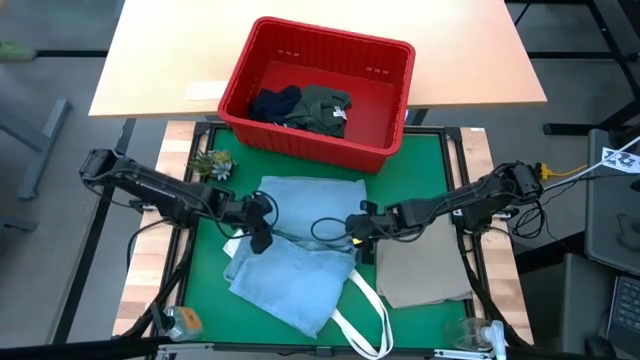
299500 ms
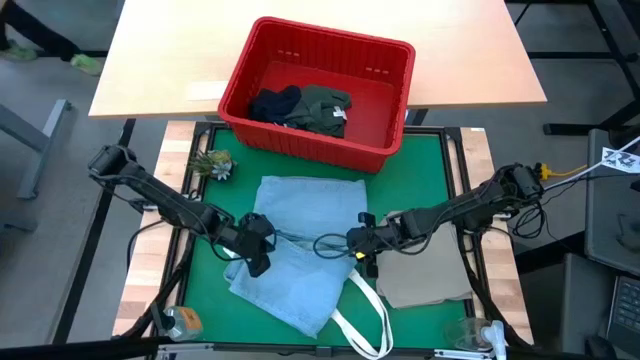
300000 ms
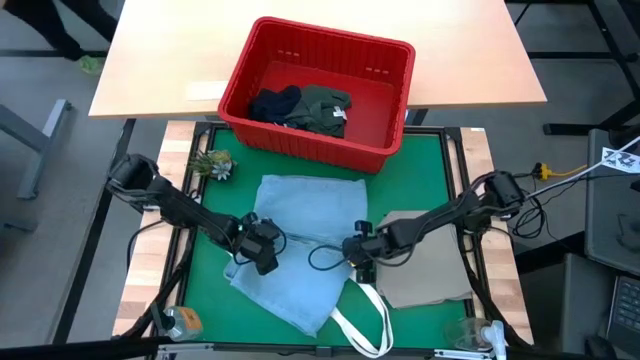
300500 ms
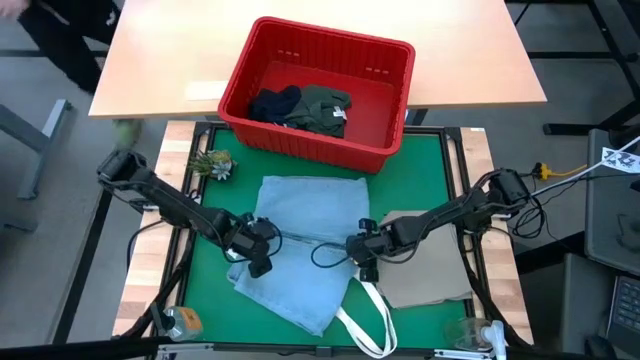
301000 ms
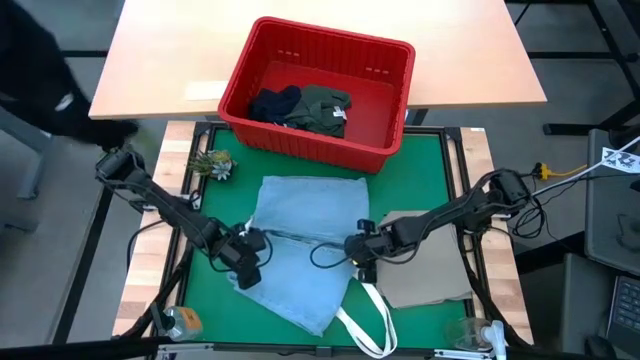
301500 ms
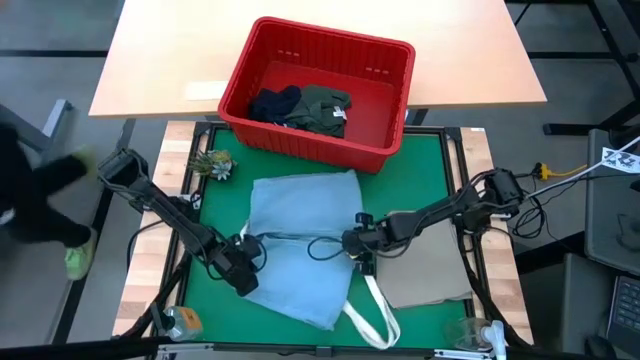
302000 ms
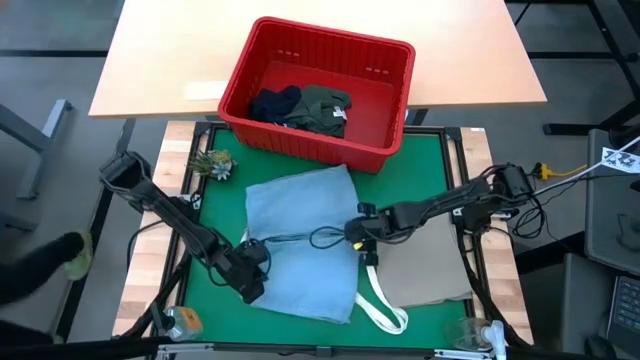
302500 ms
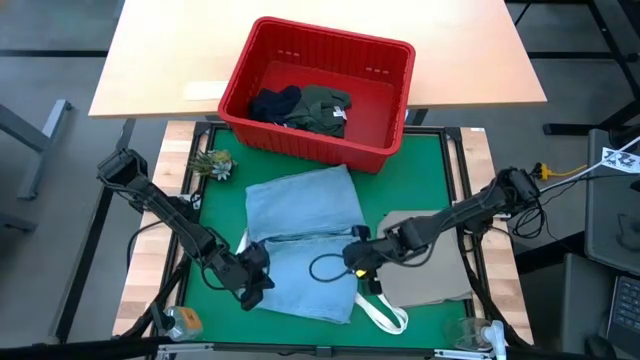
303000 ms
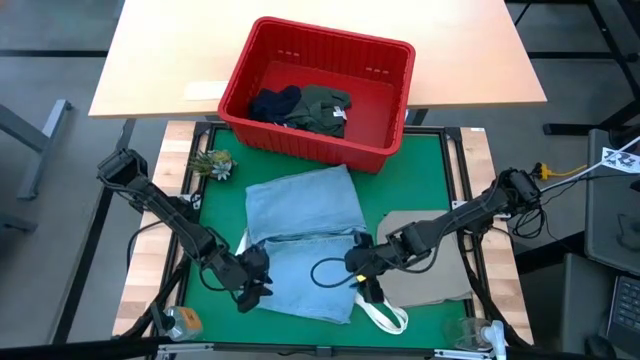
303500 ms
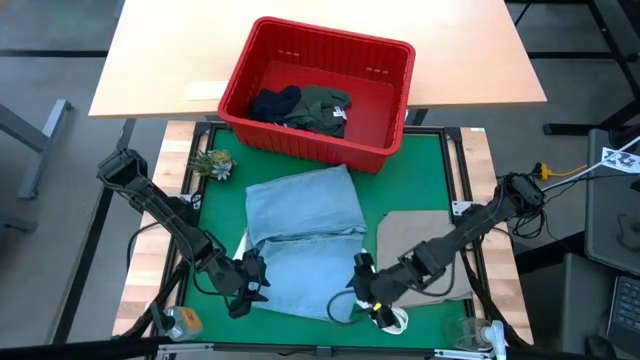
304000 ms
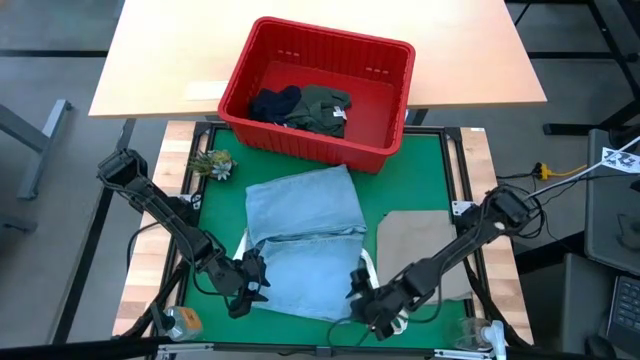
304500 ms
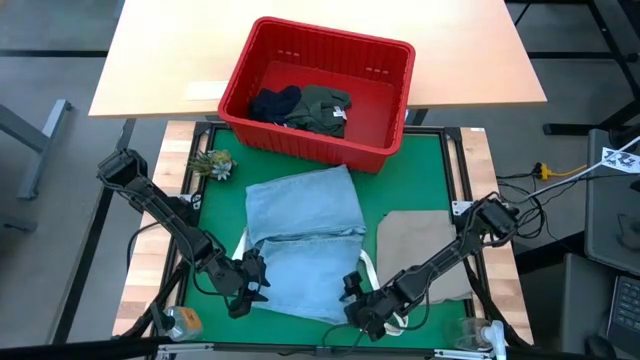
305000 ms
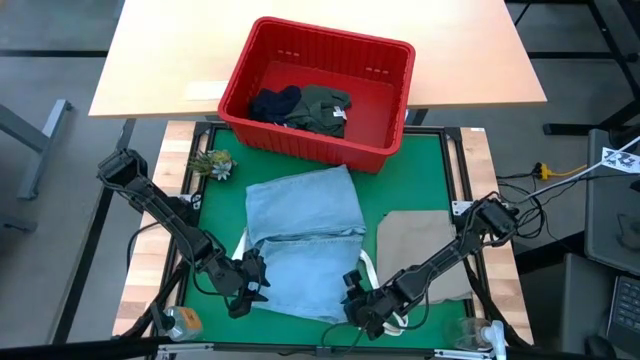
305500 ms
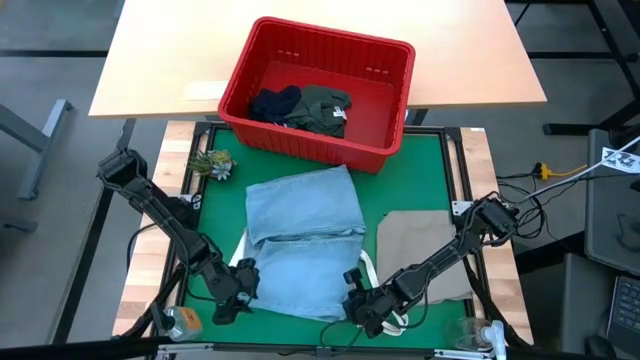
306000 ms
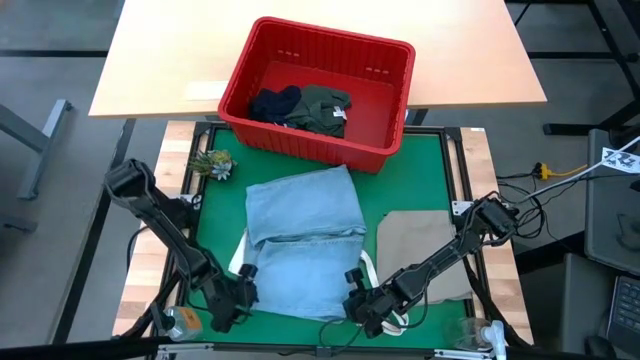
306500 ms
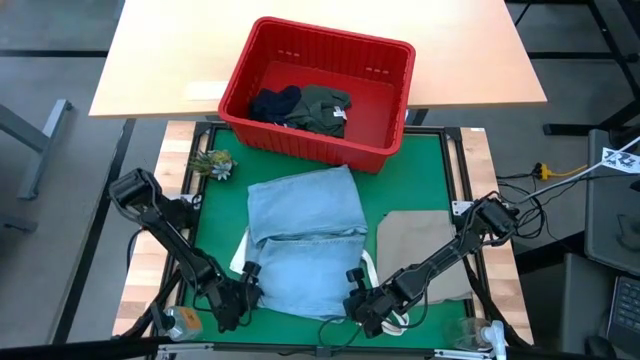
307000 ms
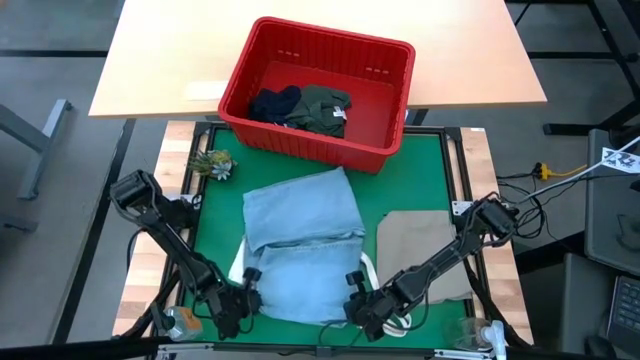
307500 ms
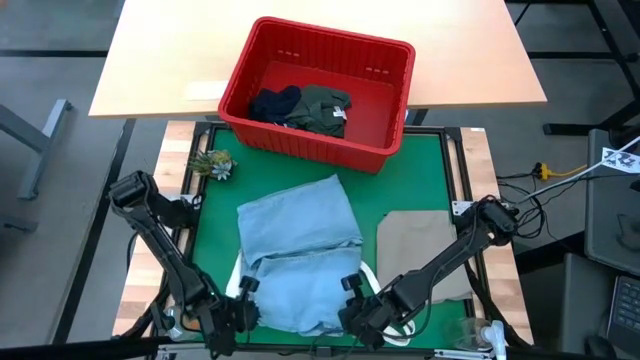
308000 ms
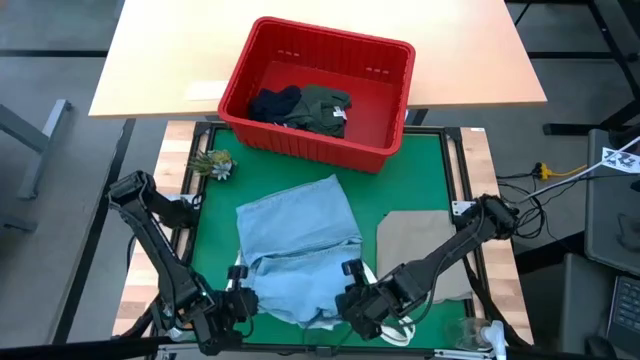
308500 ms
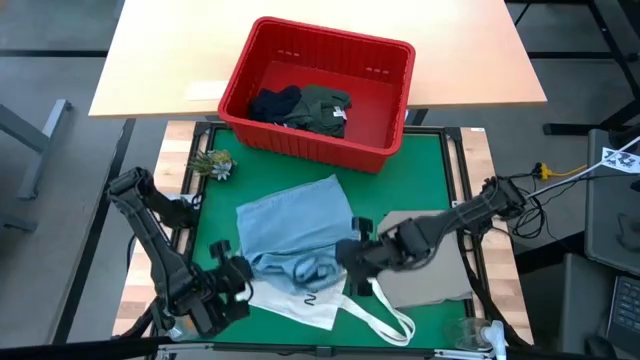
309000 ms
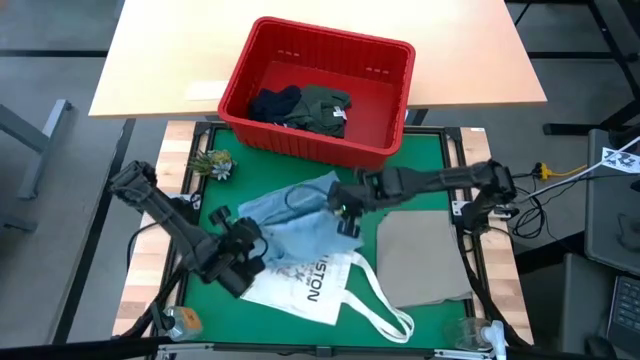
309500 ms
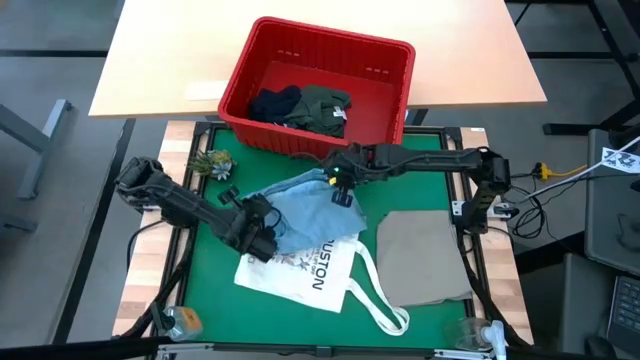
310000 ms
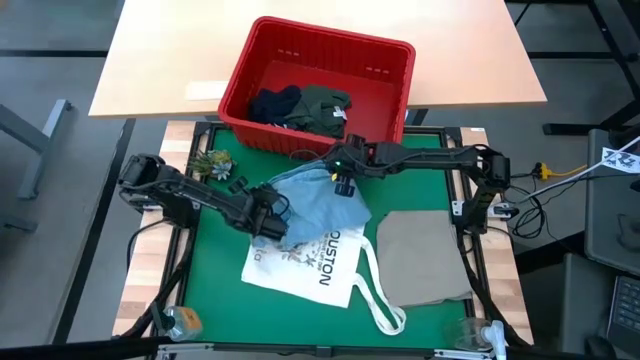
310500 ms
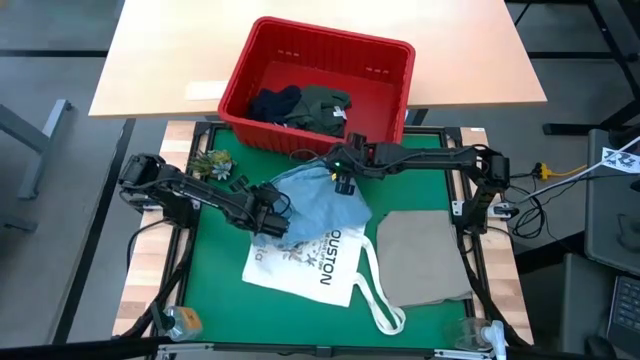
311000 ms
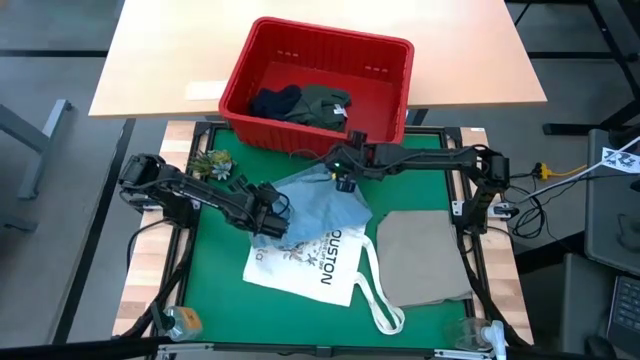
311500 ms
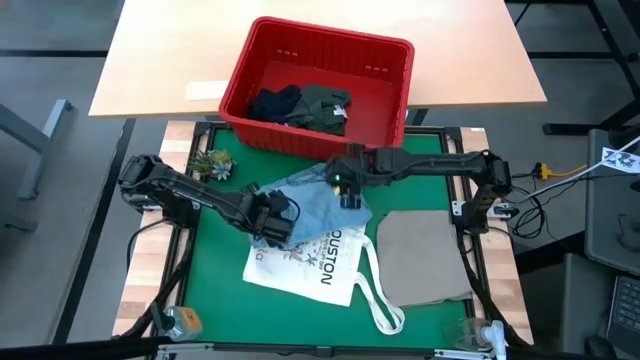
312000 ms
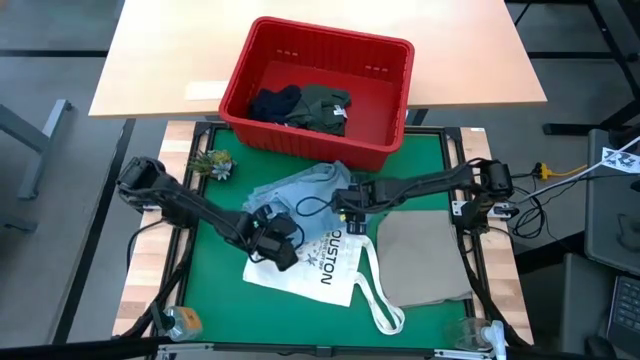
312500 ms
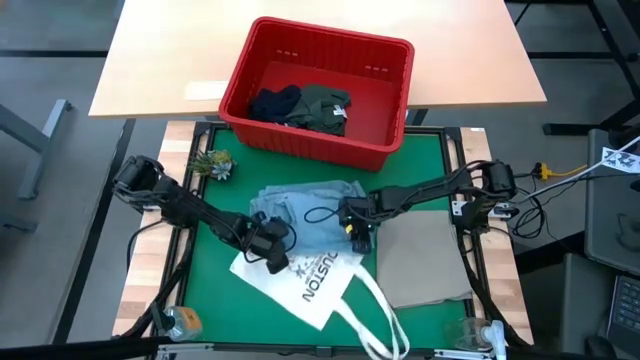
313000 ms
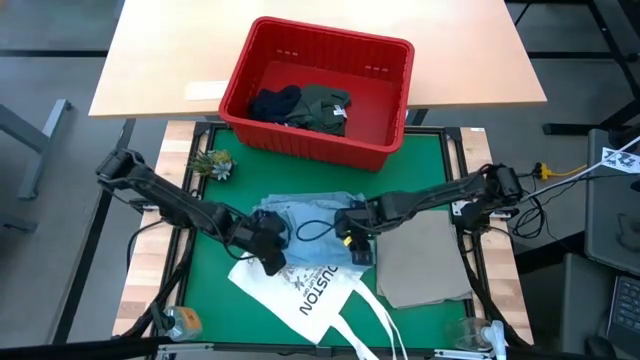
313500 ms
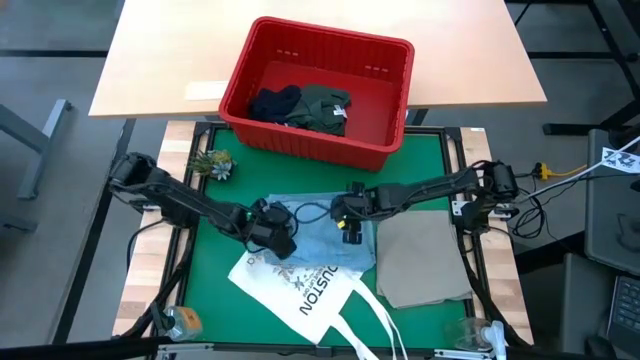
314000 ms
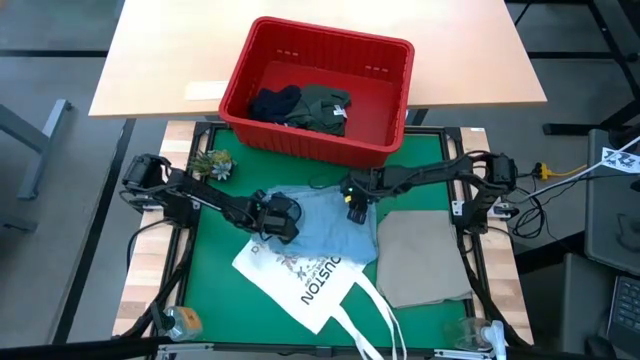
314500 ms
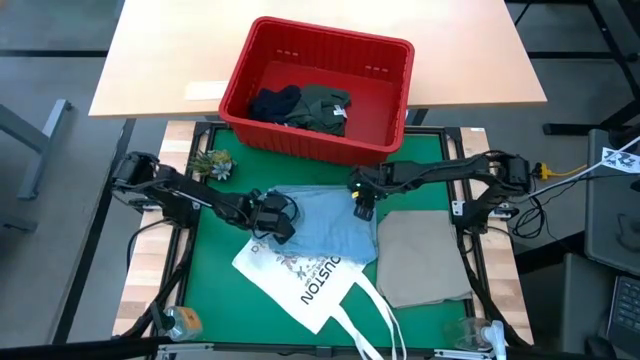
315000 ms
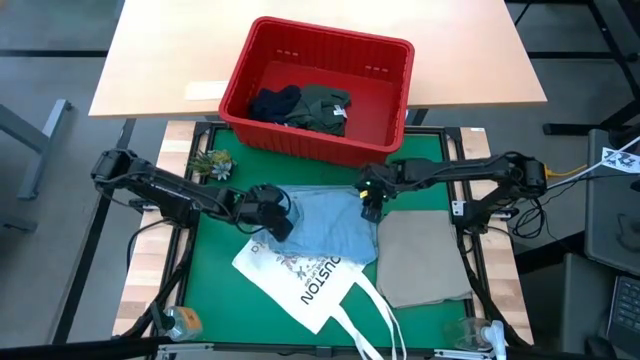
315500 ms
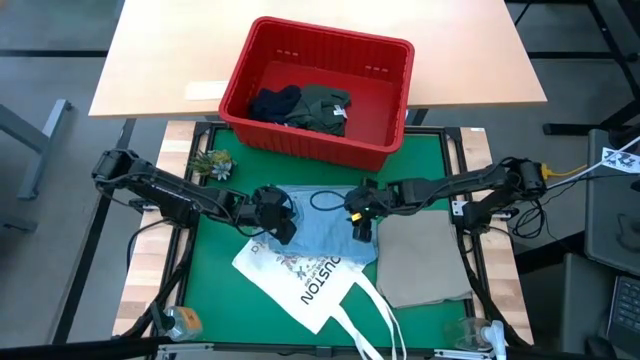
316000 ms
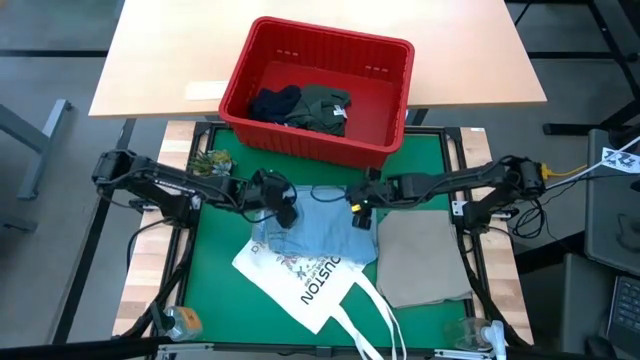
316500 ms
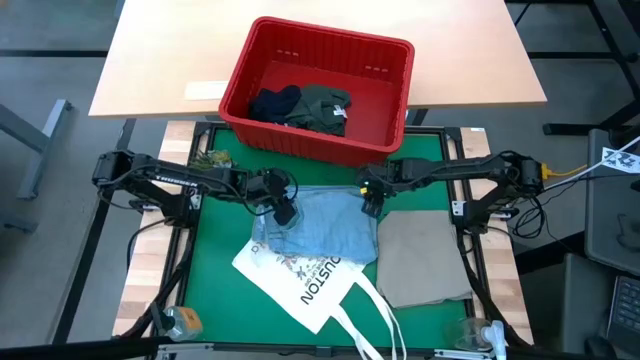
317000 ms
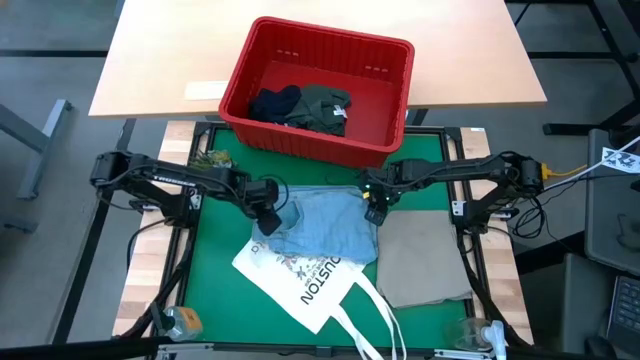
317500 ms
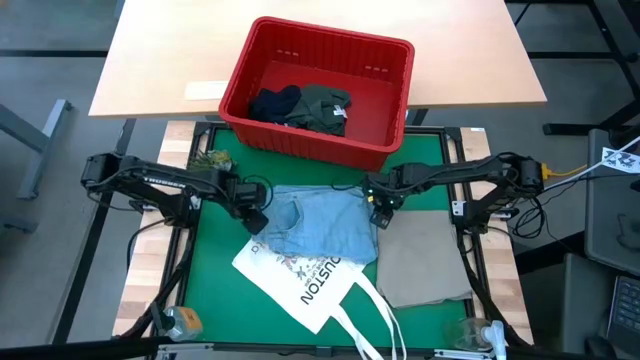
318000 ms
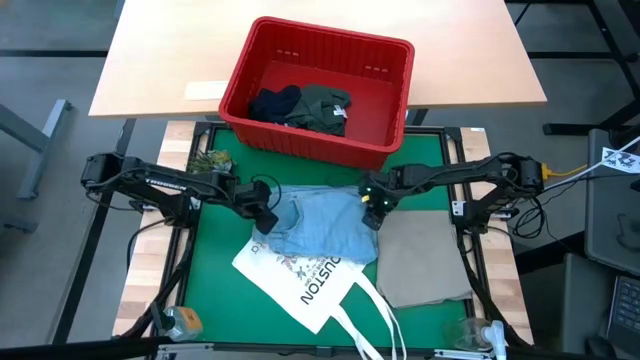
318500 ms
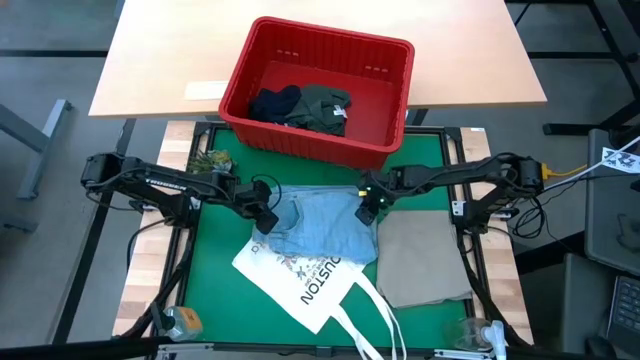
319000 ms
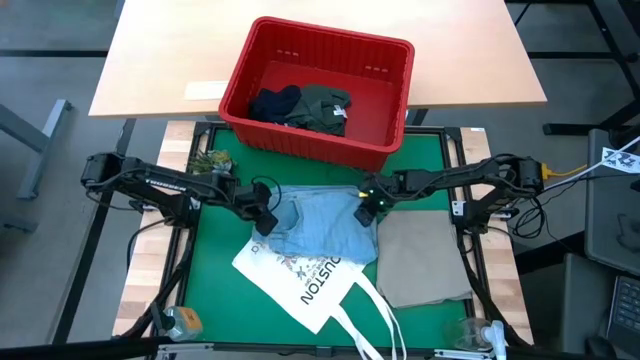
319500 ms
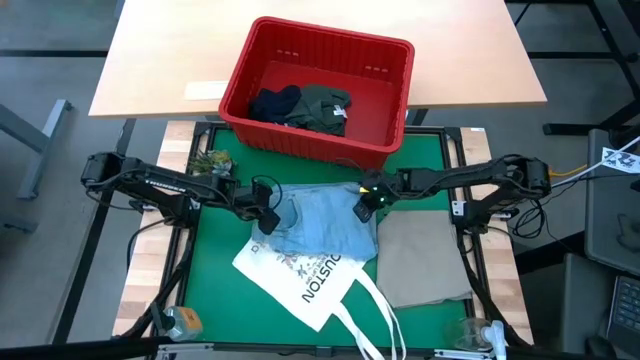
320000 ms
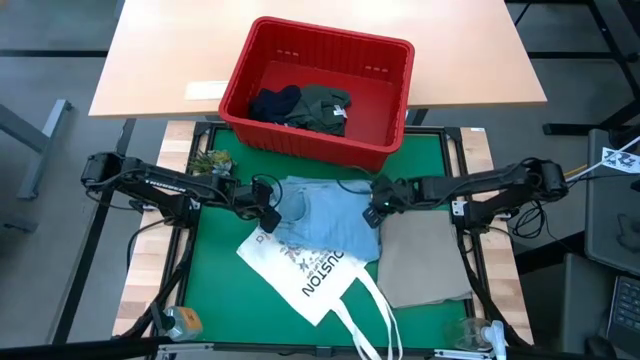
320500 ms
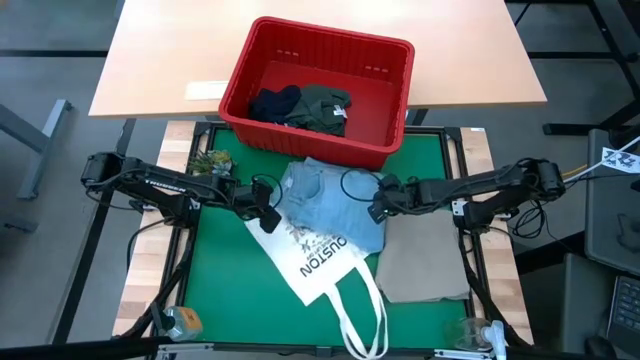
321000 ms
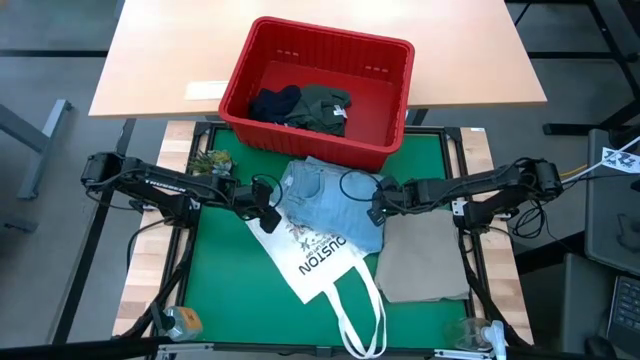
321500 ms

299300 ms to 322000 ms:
Task: Fold Laundry from Bin
Fold the light blue pants
